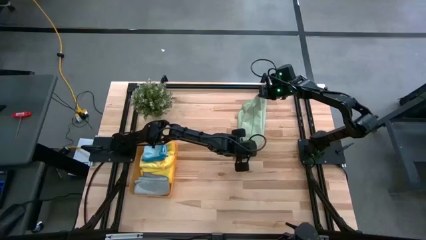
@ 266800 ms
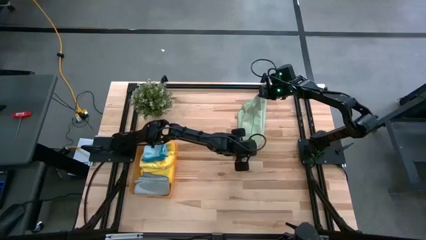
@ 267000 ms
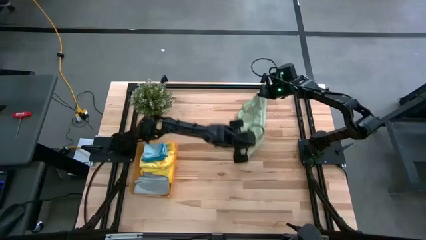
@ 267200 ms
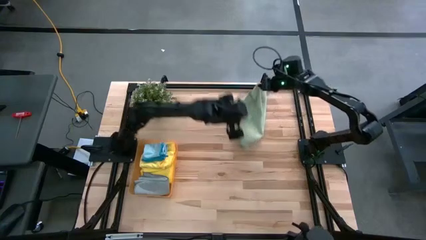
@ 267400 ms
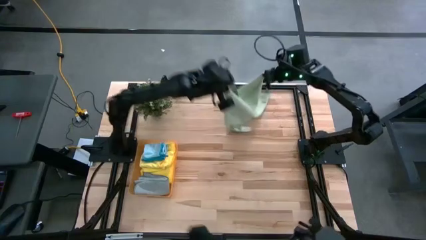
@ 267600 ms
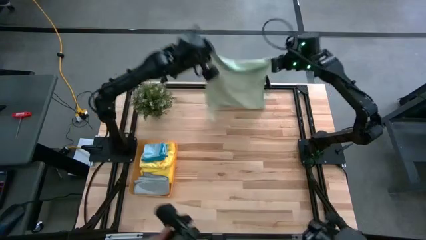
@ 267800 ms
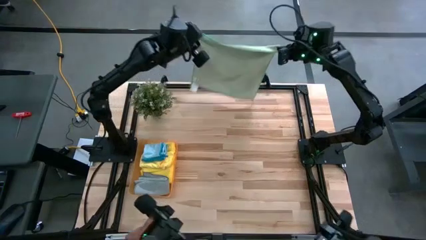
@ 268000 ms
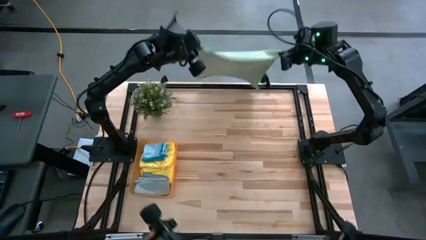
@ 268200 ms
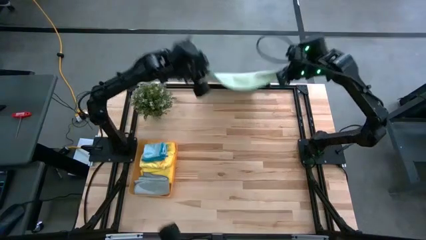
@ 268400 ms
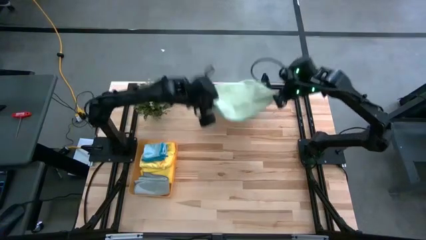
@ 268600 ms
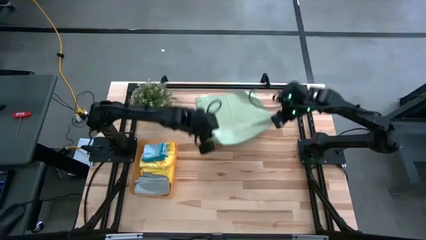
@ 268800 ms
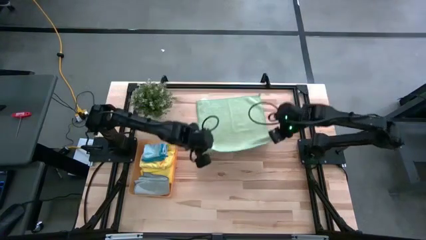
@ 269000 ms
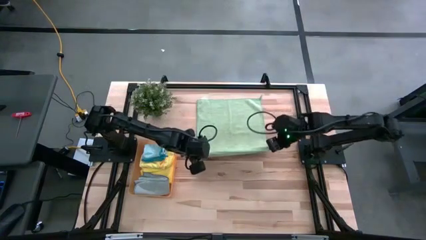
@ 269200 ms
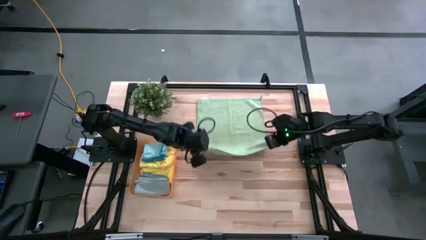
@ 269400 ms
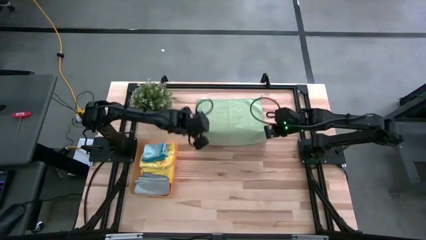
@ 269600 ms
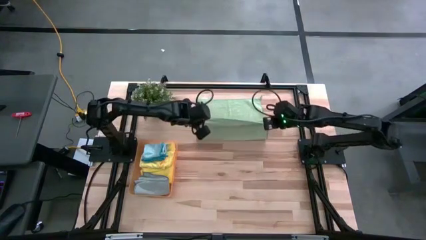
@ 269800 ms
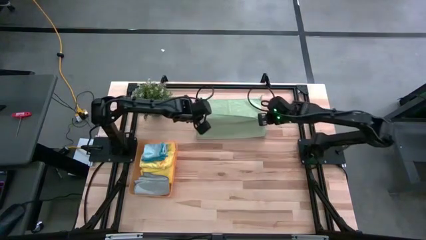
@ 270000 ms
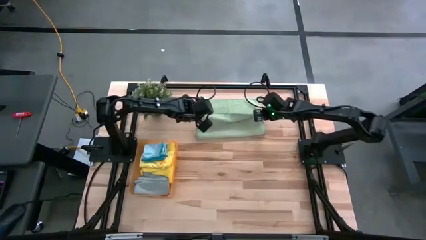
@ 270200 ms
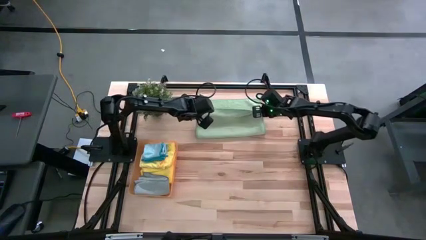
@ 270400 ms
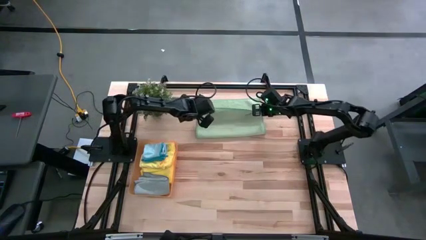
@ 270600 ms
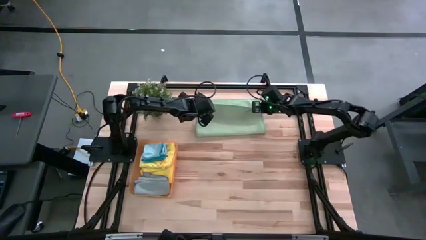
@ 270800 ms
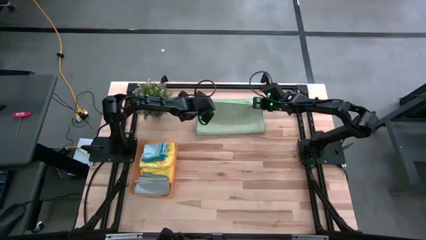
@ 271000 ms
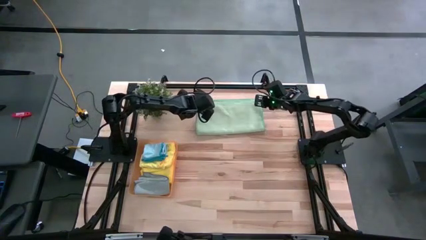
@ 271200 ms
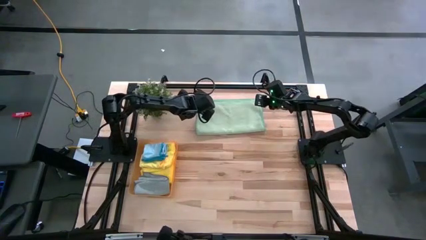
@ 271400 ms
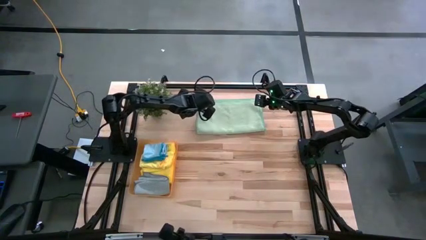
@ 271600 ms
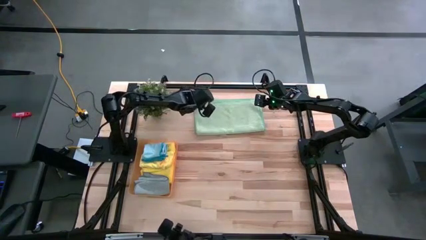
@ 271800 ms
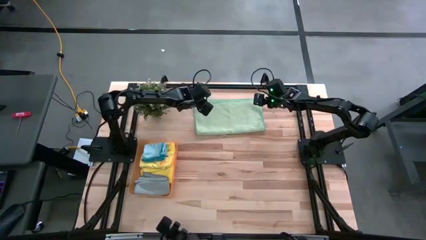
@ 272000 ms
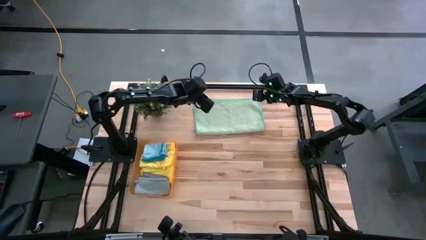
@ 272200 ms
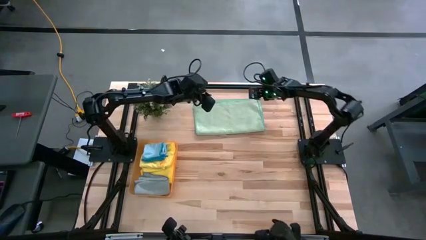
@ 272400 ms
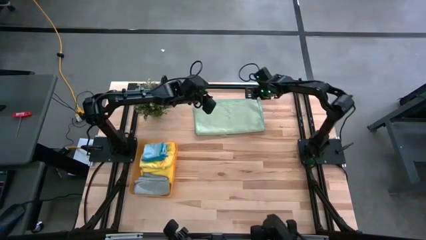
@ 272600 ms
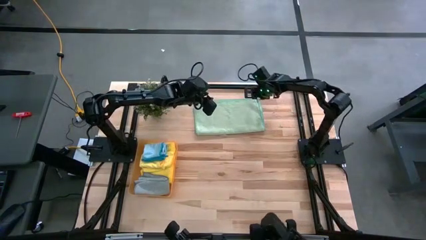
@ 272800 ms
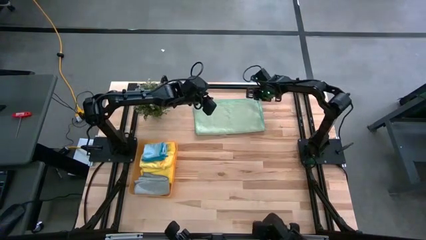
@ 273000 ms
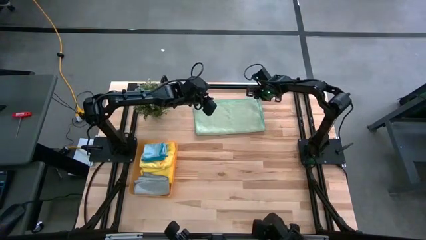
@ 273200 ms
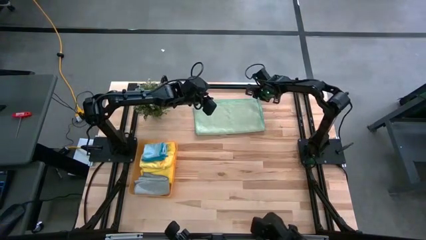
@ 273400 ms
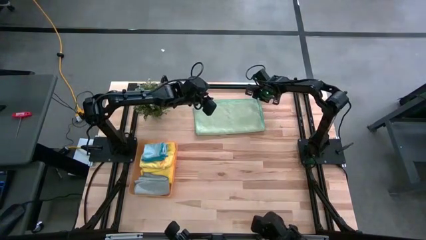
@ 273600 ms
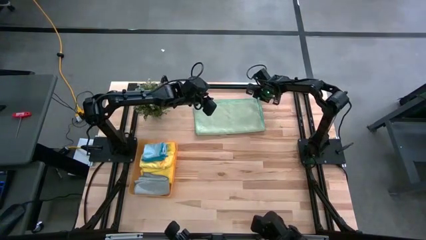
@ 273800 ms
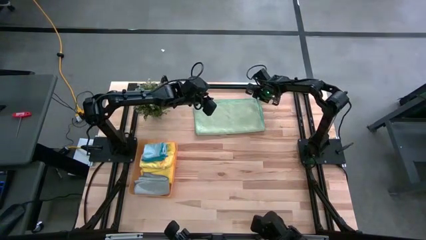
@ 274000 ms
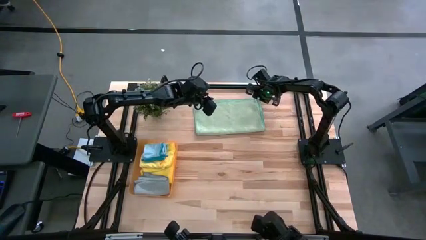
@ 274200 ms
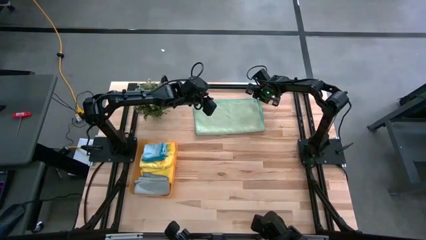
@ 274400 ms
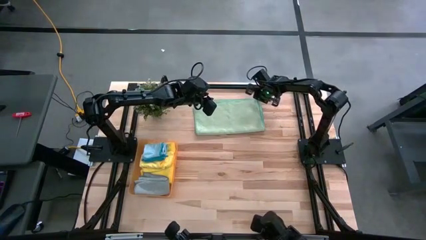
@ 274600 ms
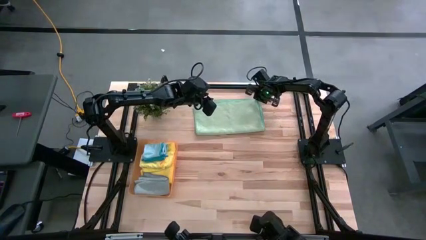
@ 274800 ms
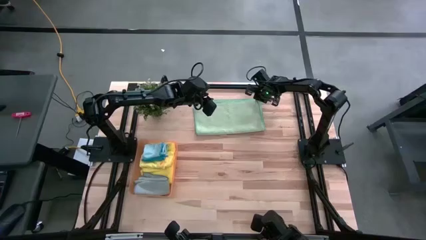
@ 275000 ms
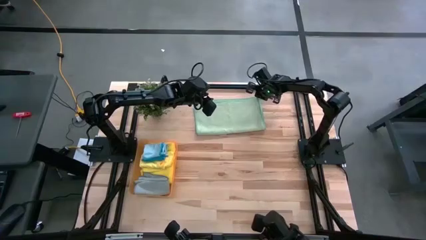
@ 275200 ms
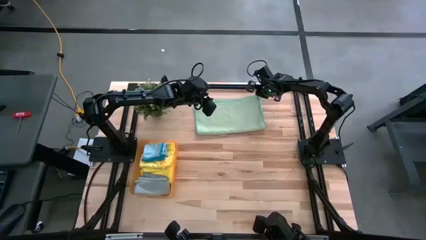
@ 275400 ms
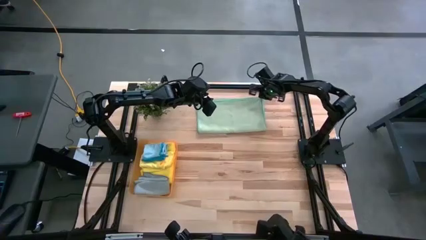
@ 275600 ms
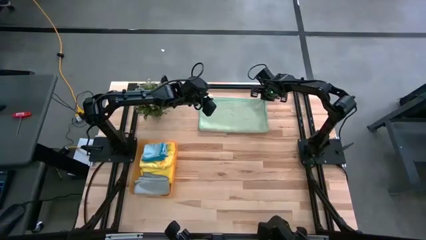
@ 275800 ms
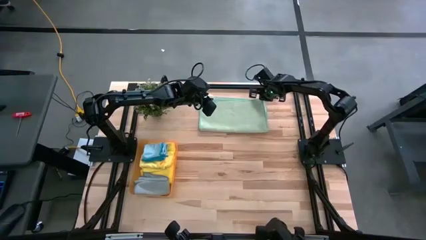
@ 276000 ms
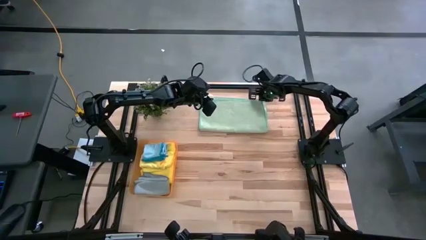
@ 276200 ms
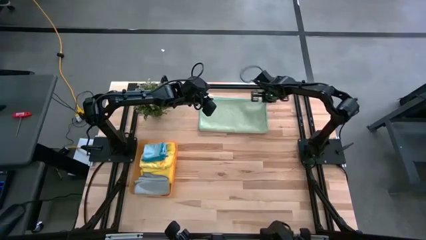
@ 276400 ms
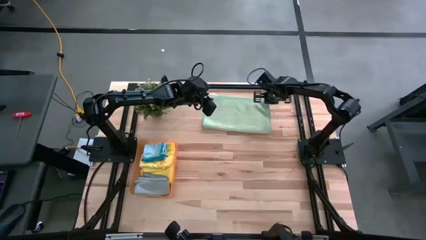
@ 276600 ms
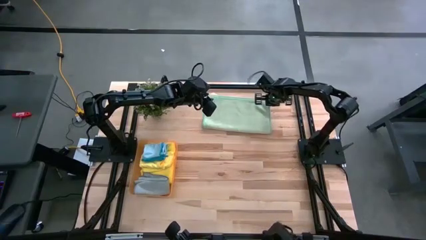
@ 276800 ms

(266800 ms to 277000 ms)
Task: Fold microfiber towels
Fold the green microfiber towel

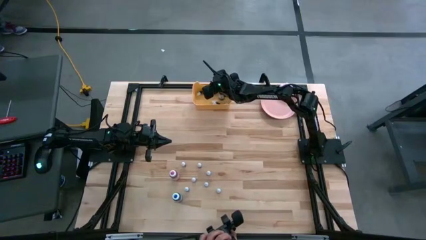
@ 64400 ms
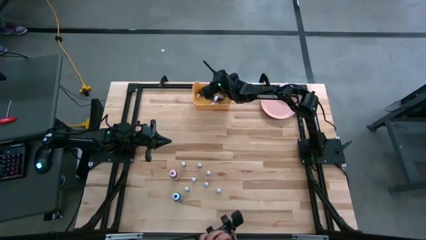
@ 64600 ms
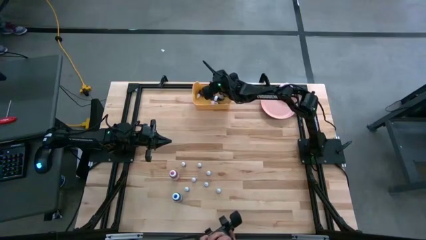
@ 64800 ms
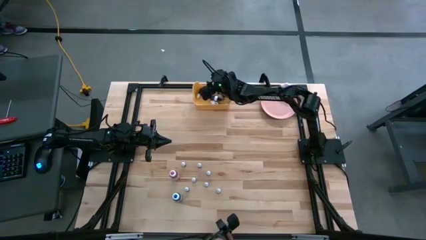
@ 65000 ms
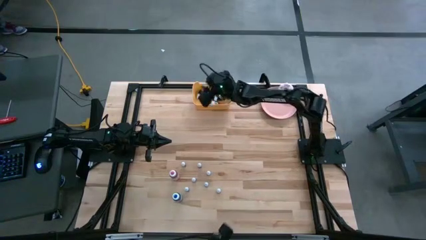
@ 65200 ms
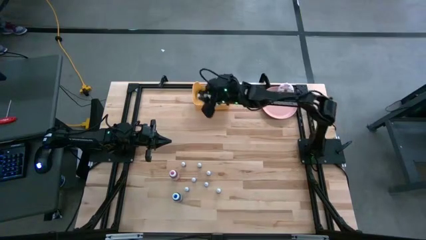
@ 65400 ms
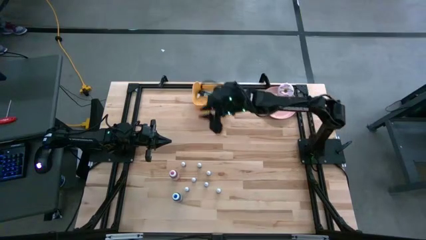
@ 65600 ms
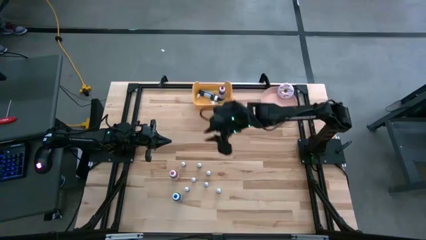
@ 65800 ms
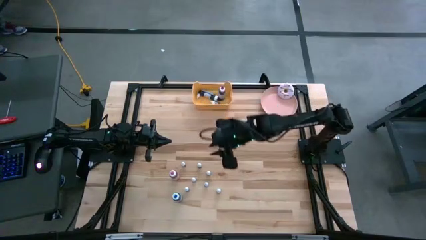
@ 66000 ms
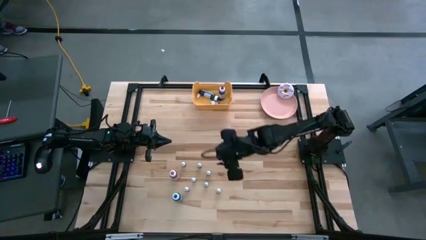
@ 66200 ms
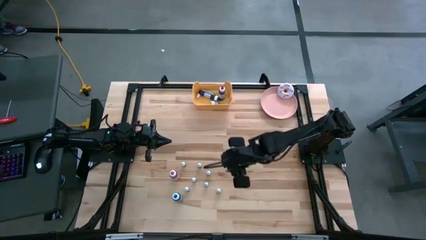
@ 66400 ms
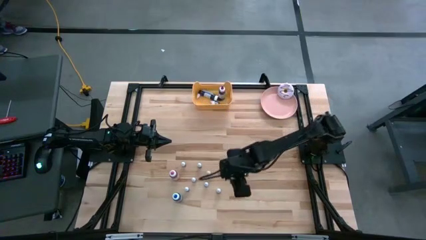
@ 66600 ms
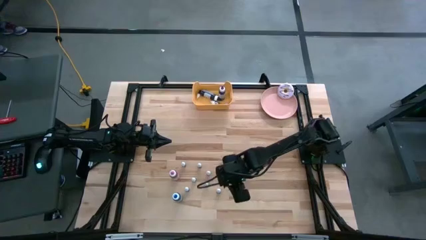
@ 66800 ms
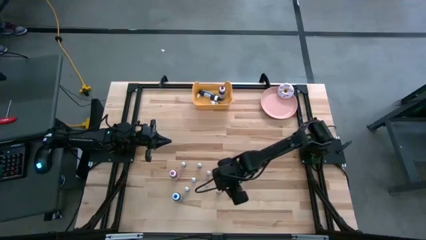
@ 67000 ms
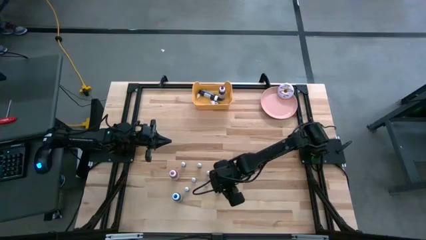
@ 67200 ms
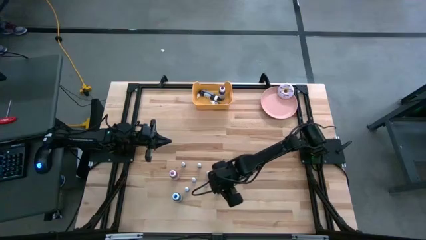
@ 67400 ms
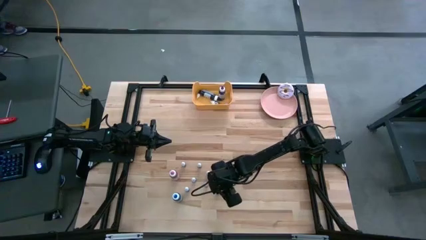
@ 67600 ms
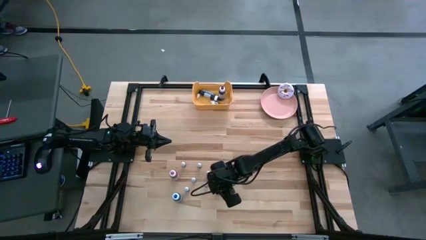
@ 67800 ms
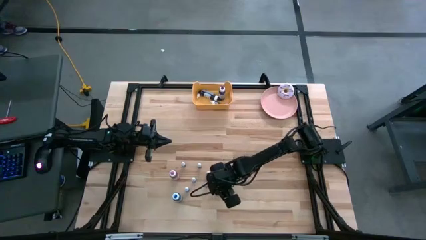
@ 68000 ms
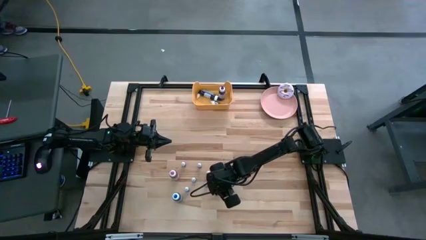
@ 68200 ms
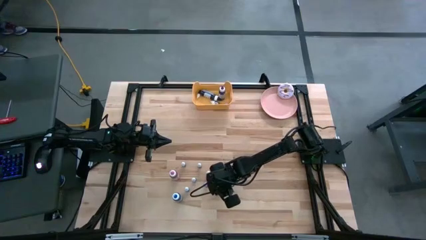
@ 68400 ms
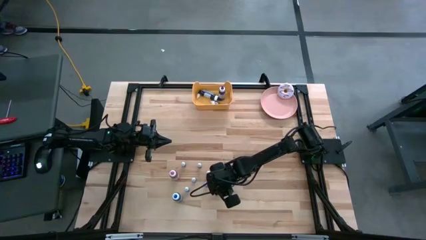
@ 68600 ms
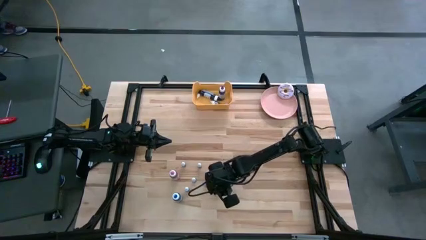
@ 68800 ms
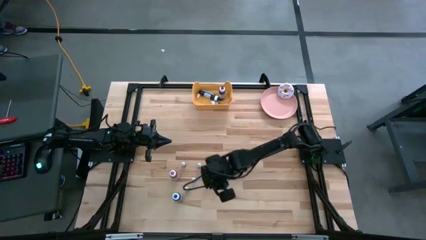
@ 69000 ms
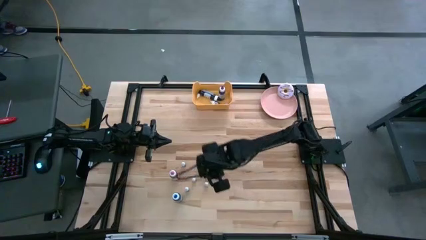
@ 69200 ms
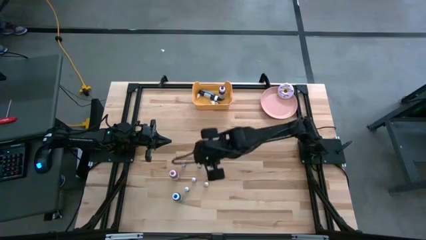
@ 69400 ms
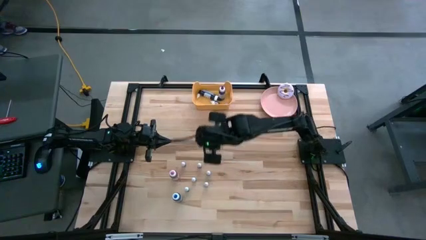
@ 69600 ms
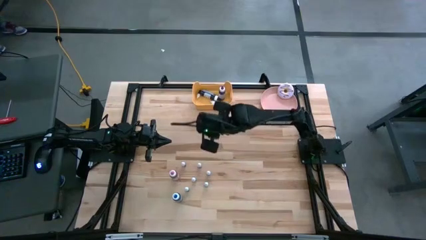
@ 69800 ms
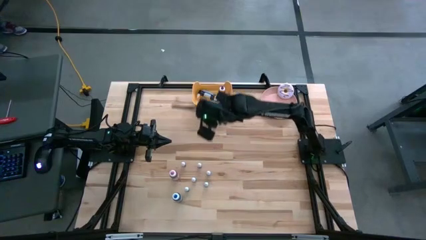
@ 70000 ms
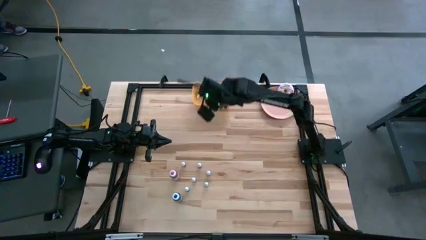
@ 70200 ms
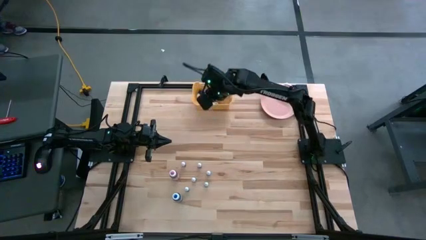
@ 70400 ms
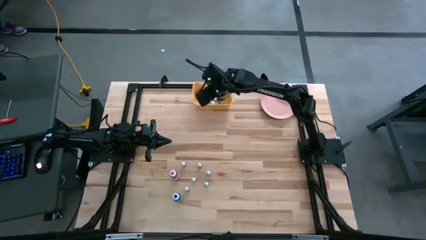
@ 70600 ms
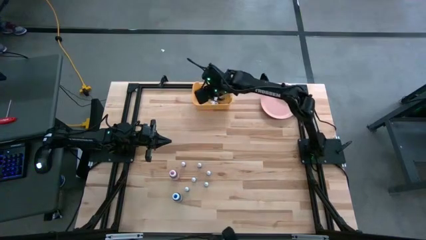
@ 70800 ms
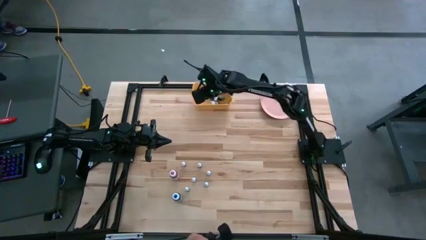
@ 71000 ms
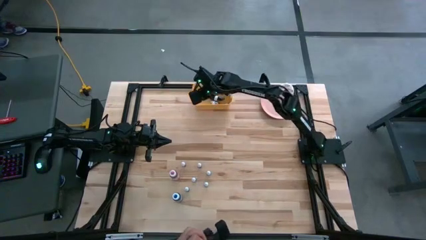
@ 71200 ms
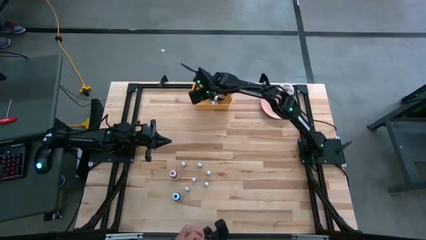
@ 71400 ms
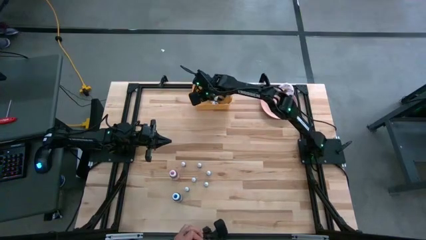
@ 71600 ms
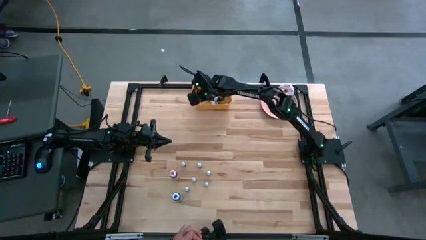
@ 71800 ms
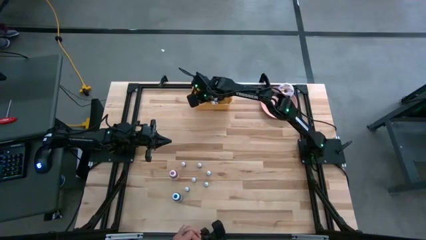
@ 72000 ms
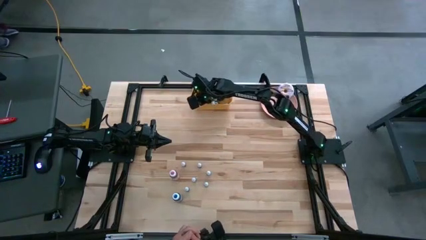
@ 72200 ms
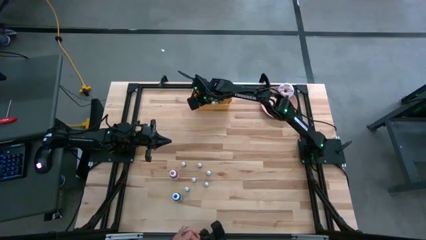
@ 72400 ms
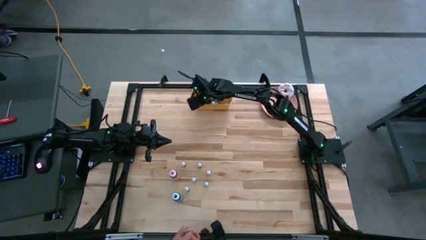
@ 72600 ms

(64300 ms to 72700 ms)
Task: Pick & Place food coloring
Put the small red food coloring bottle into the yellow bin
